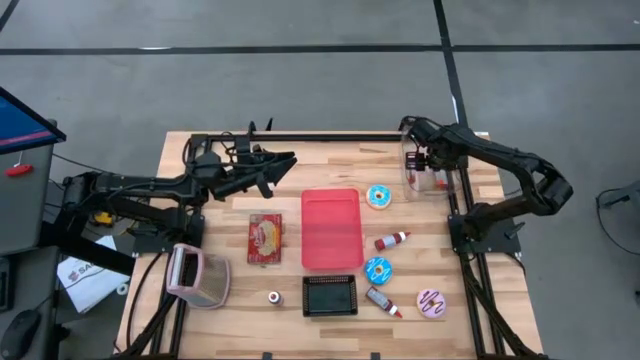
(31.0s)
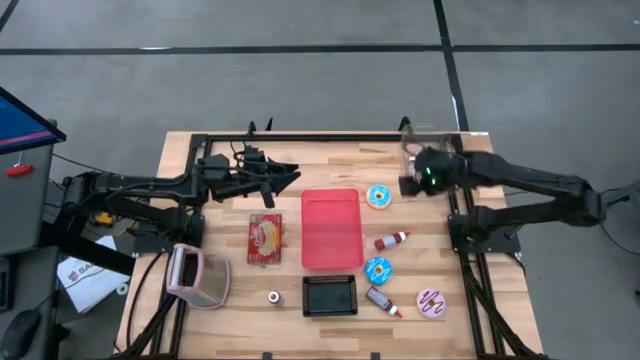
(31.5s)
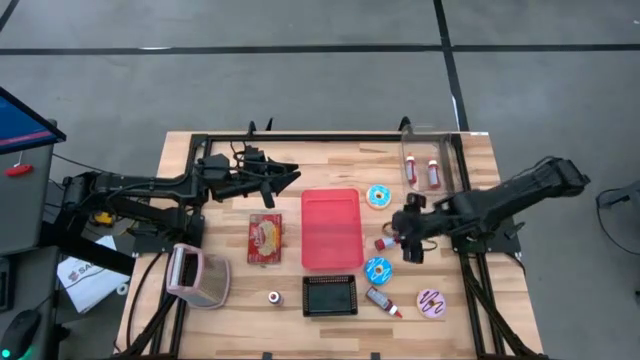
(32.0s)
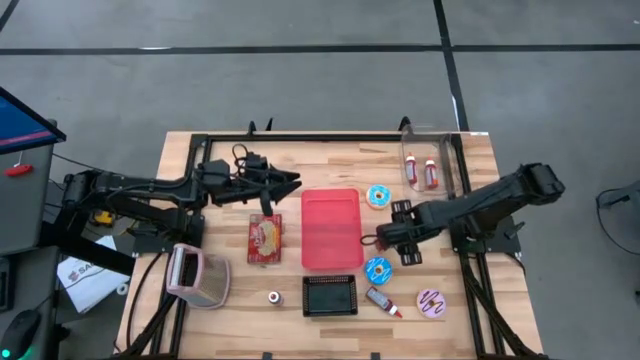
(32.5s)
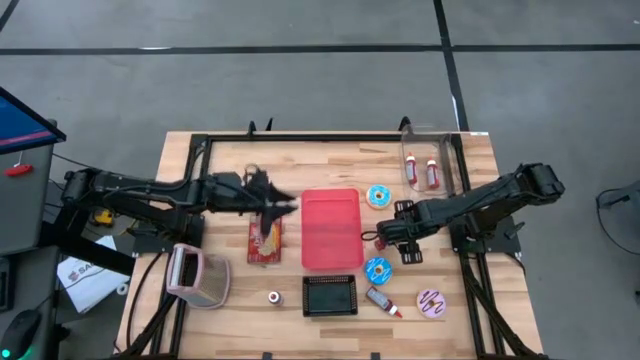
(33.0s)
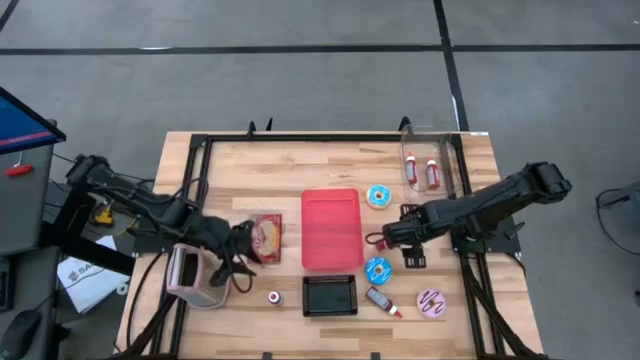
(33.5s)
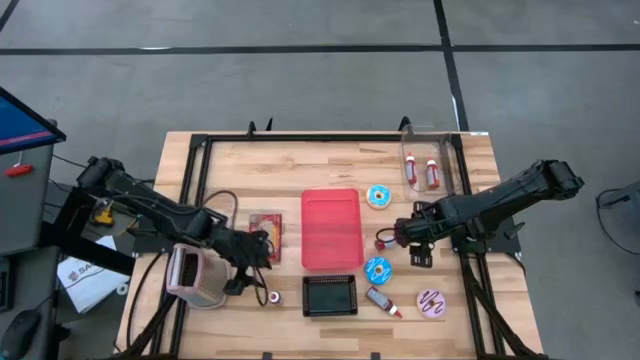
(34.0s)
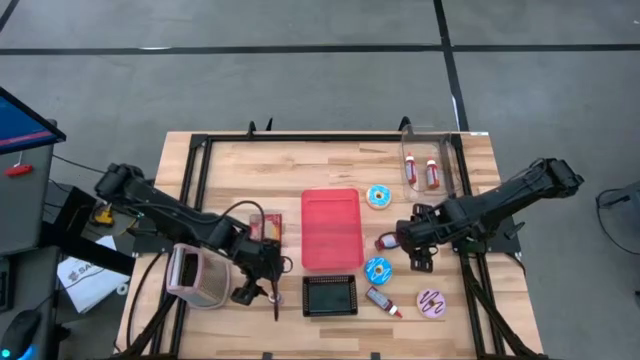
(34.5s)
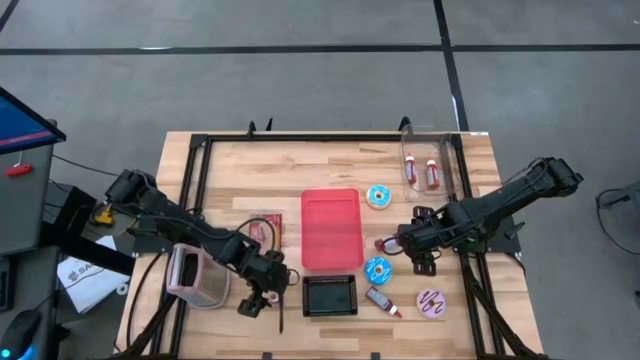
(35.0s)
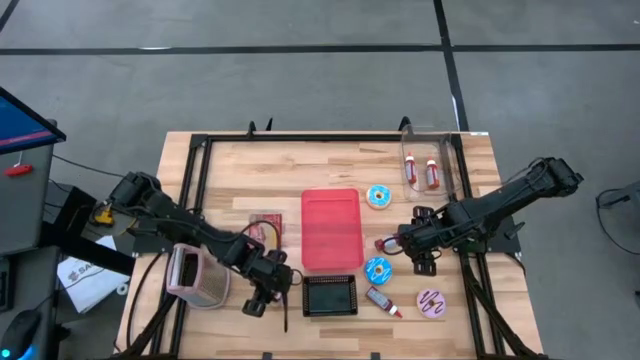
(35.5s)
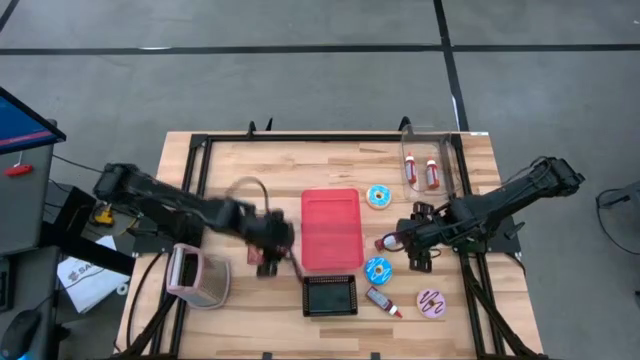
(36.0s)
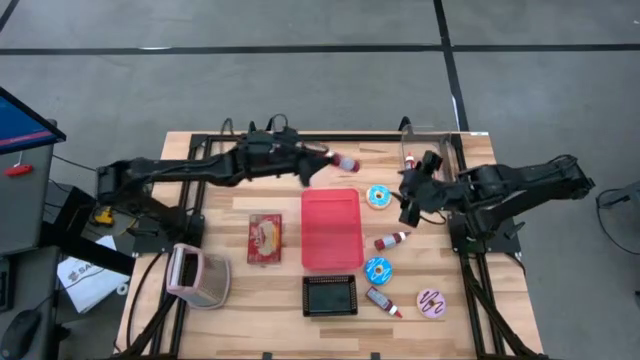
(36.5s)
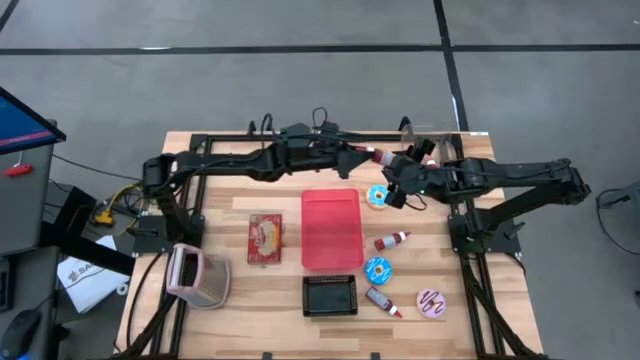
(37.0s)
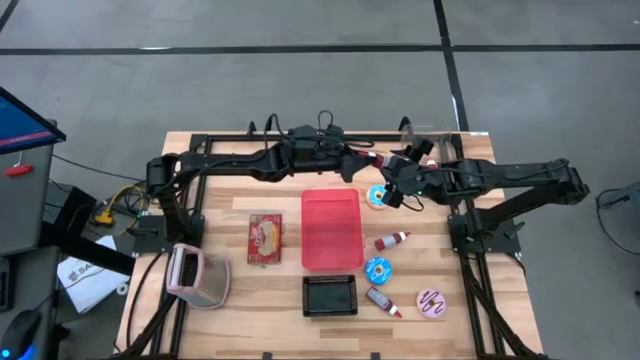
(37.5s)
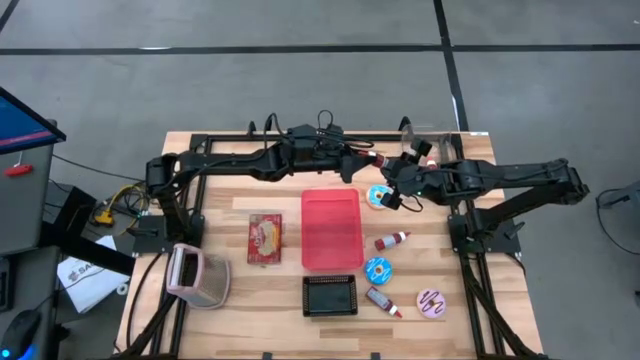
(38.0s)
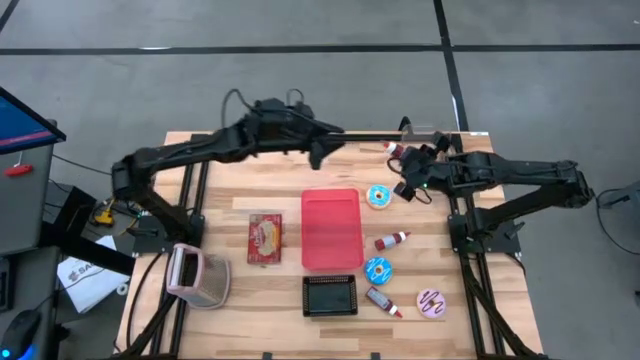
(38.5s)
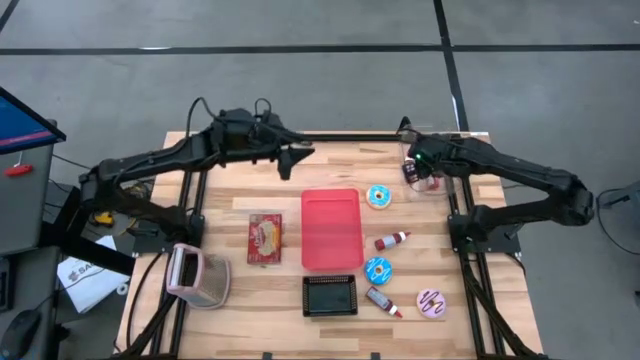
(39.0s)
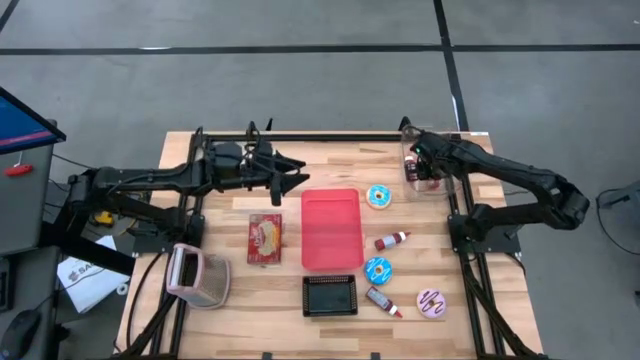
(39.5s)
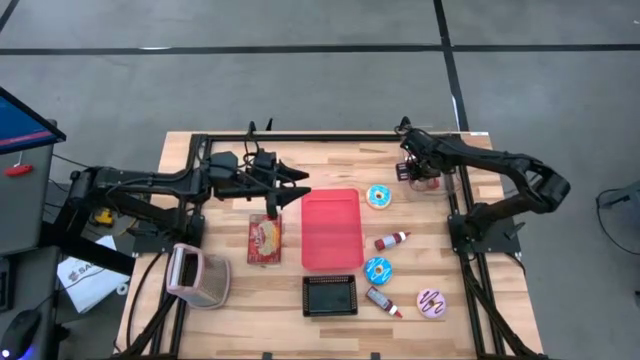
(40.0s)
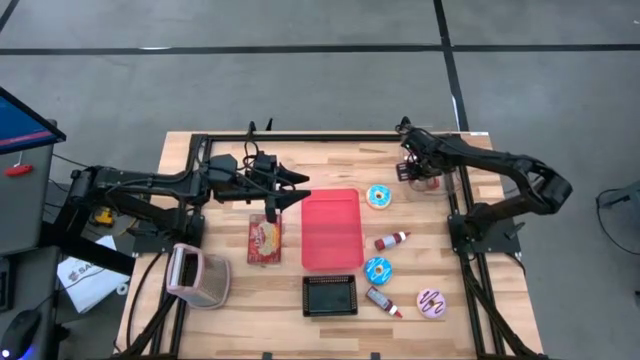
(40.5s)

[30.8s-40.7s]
Put the bottom left red food coloring bottle into the transparent bin

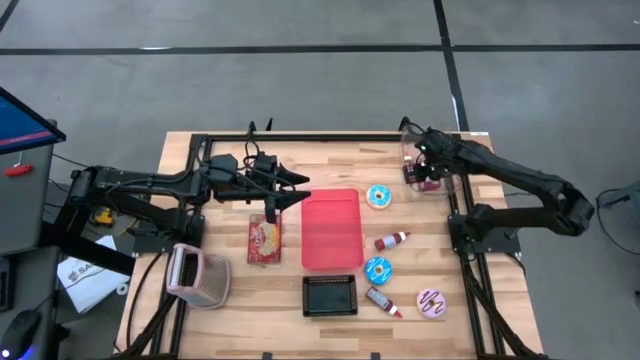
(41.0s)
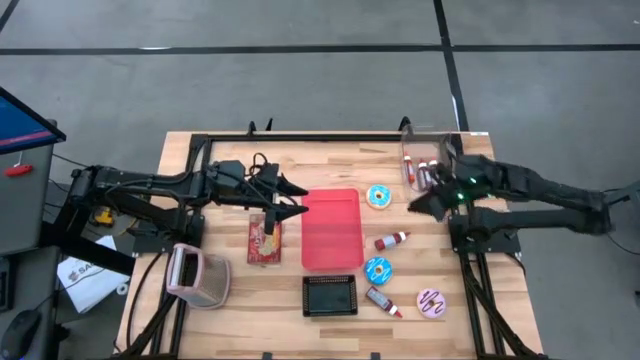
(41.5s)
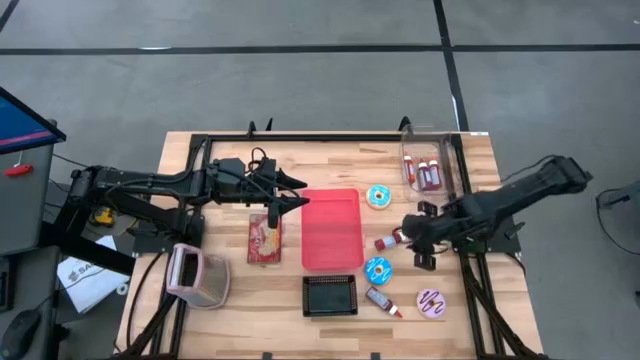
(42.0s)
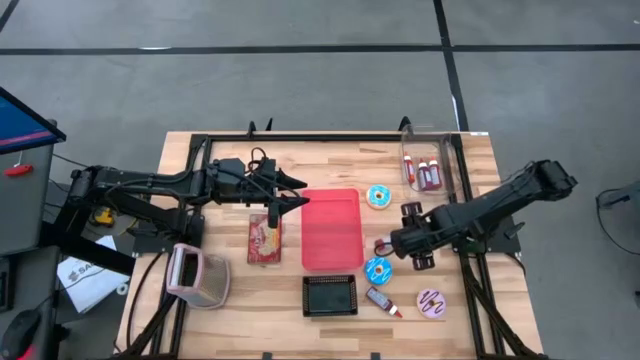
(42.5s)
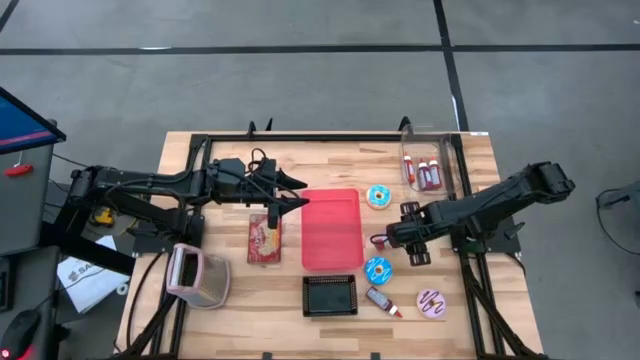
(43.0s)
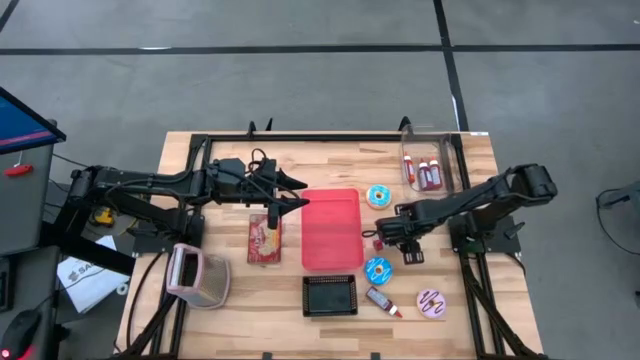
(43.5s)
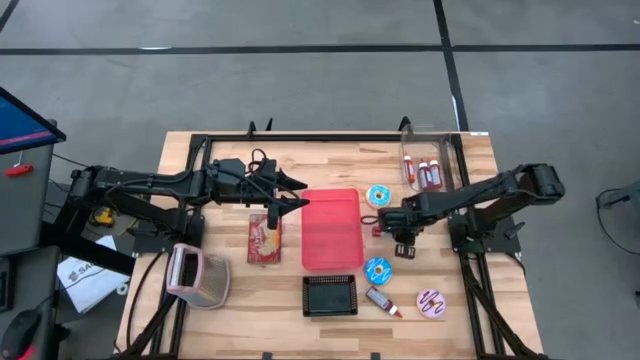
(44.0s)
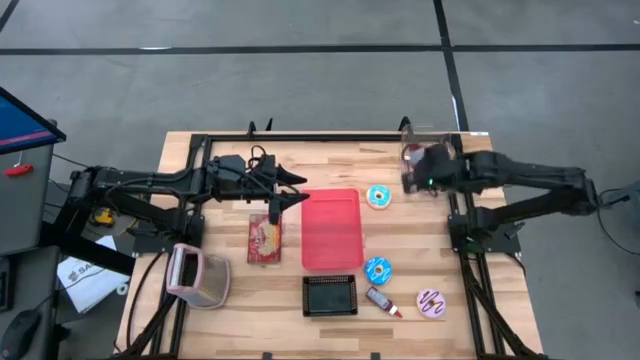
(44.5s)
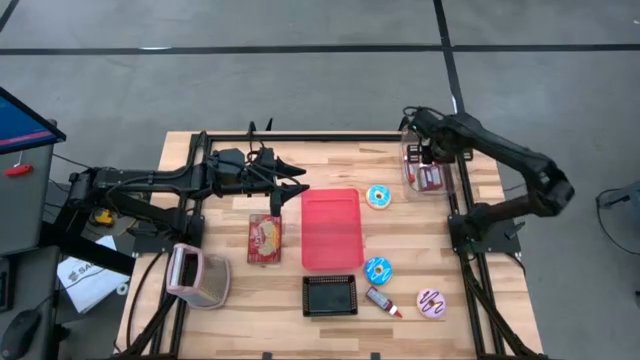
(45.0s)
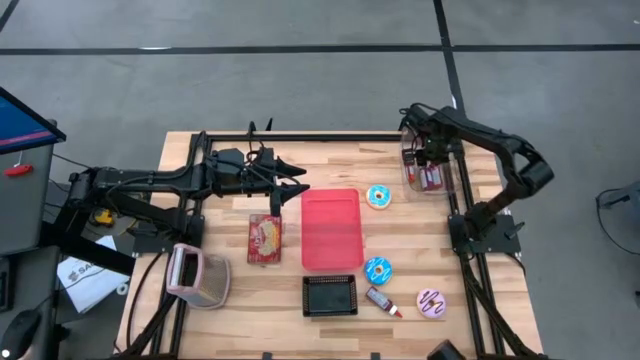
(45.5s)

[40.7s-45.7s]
Put the top red food coloring bottle into the transparent bin

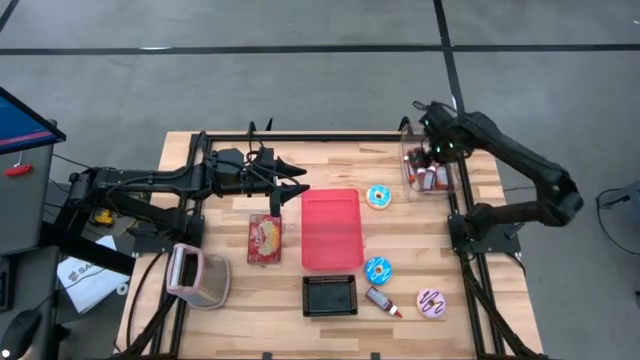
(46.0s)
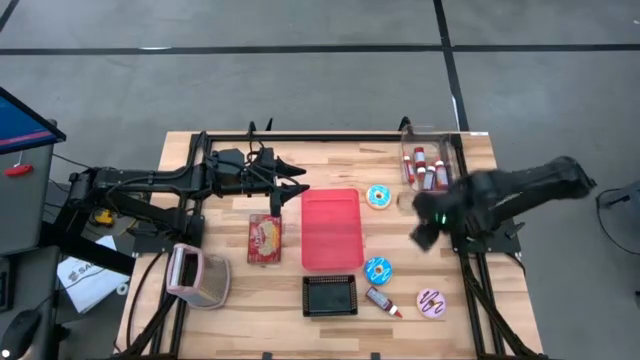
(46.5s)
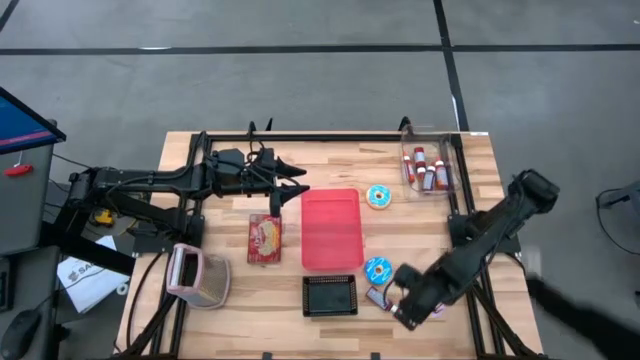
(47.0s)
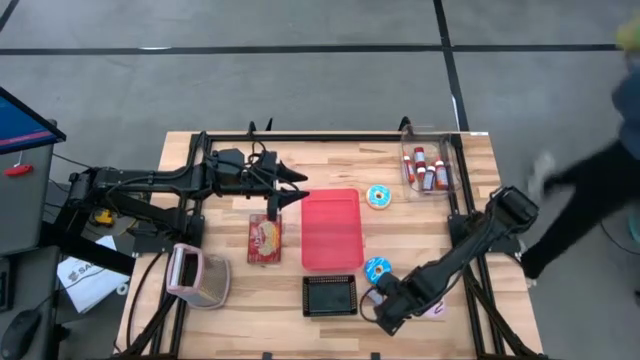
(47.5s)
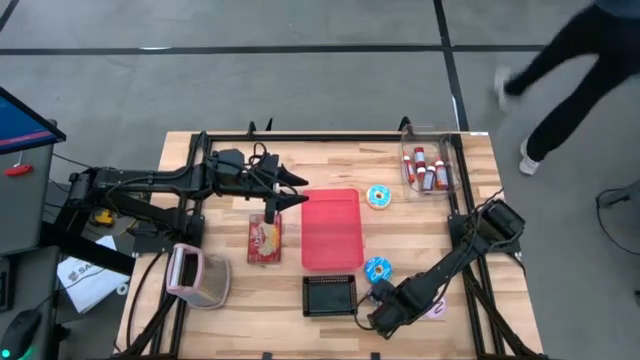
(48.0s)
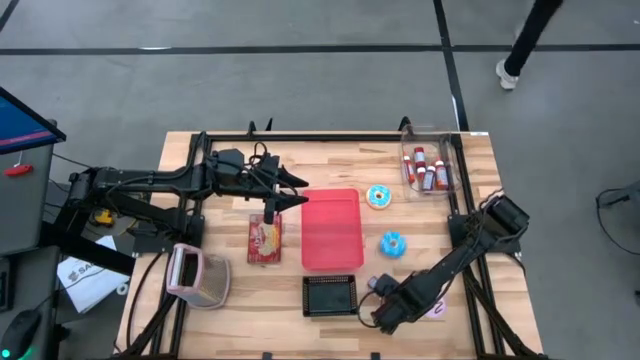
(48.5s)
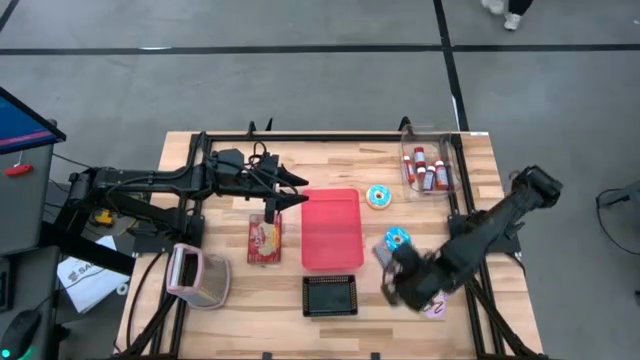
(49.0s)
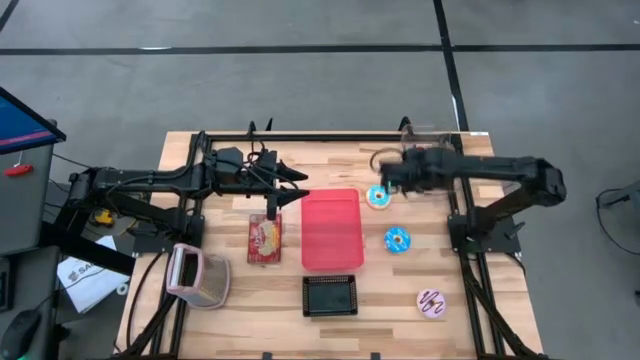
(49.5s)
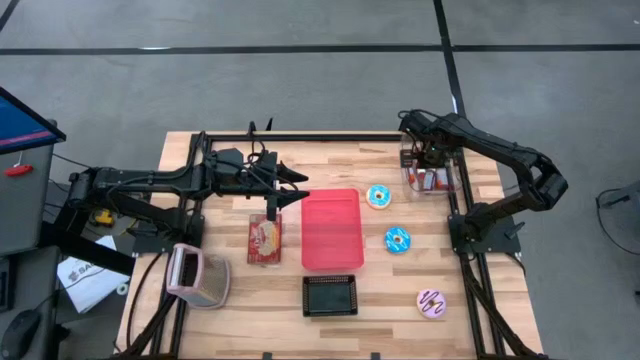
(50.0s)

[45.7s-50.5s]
Put the red food coloring bottle into the transparent bin
